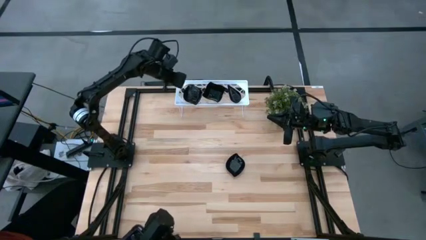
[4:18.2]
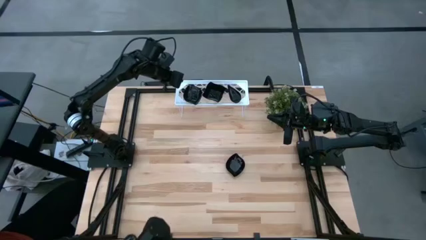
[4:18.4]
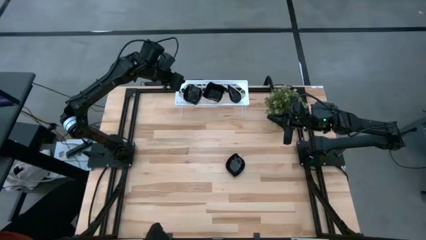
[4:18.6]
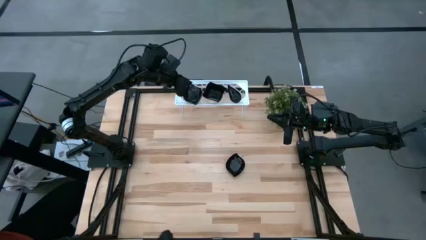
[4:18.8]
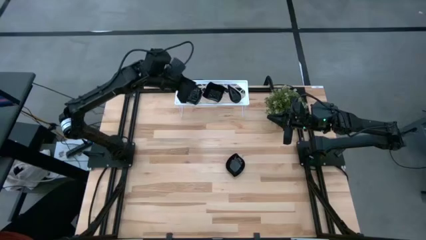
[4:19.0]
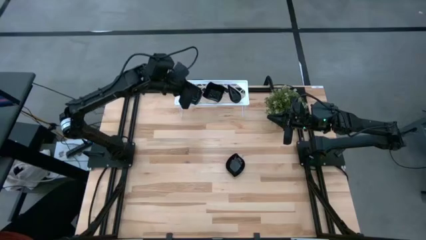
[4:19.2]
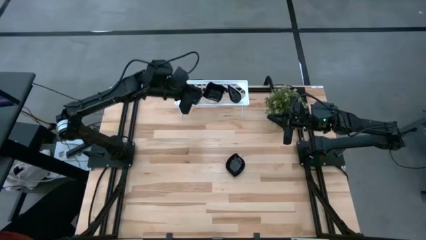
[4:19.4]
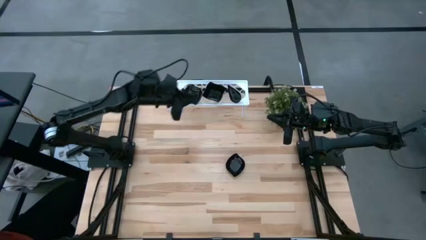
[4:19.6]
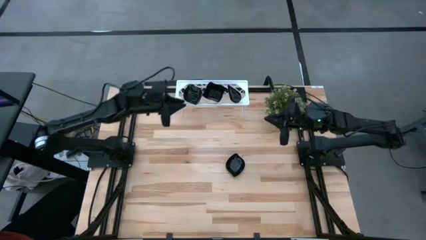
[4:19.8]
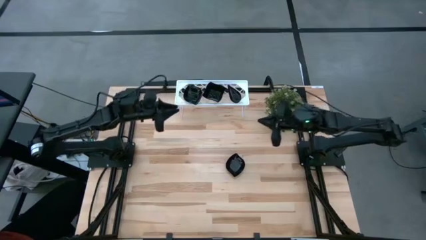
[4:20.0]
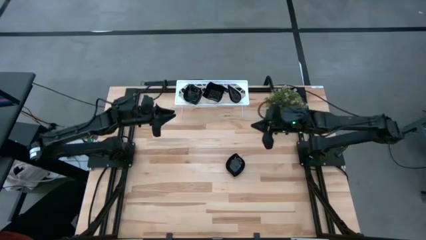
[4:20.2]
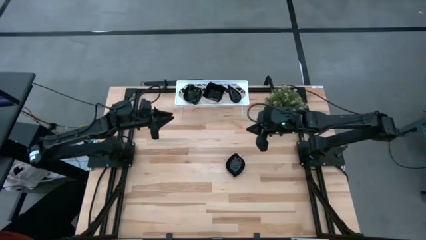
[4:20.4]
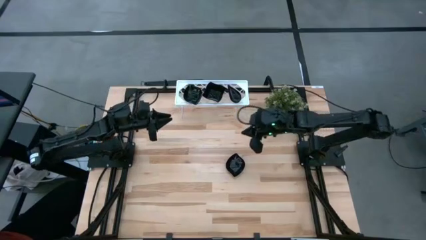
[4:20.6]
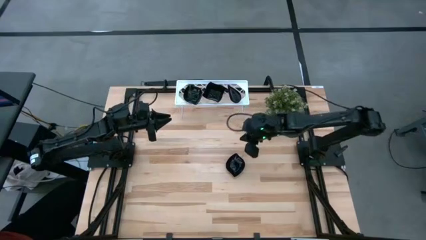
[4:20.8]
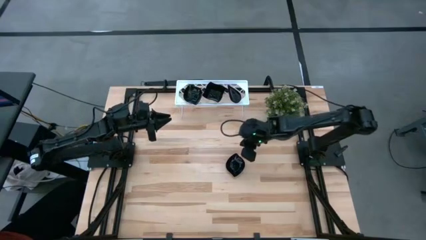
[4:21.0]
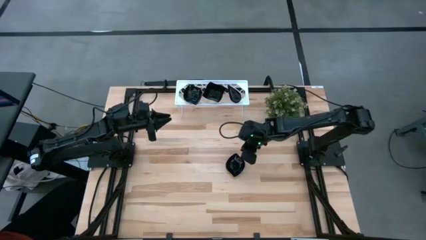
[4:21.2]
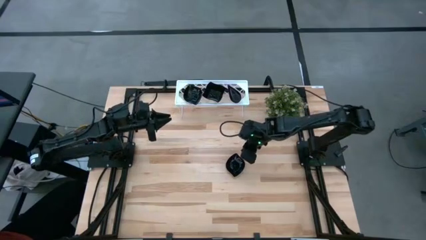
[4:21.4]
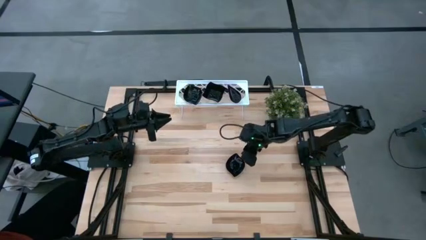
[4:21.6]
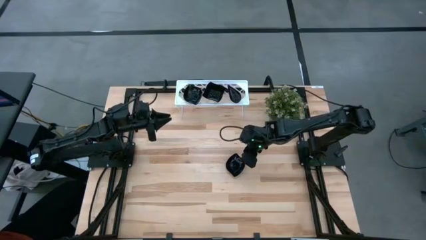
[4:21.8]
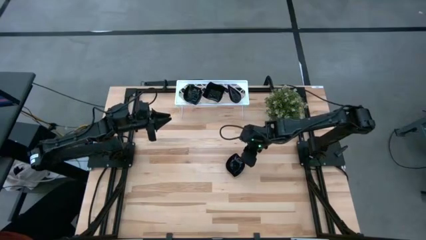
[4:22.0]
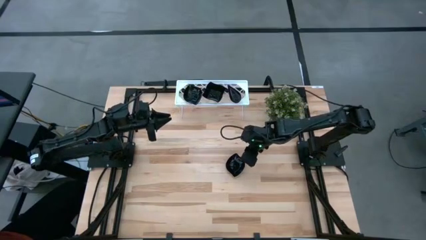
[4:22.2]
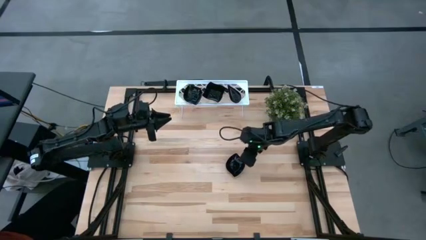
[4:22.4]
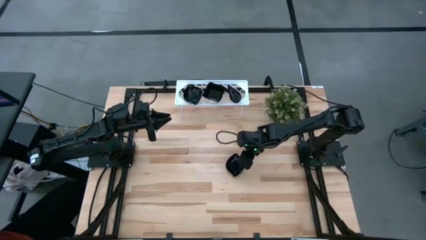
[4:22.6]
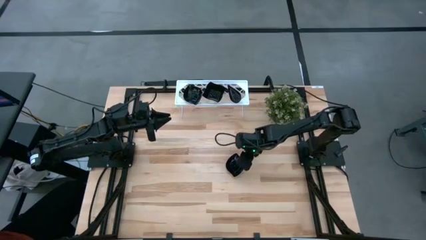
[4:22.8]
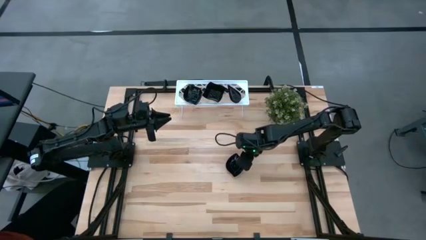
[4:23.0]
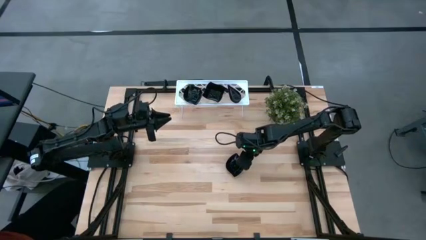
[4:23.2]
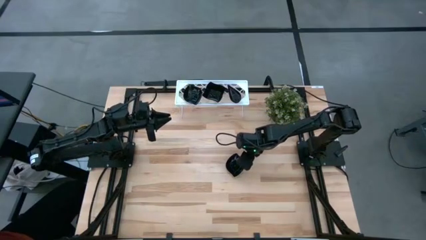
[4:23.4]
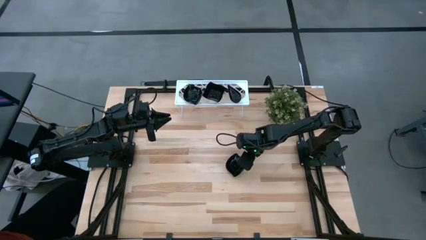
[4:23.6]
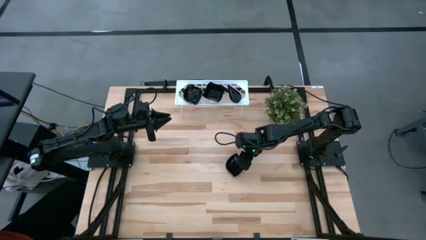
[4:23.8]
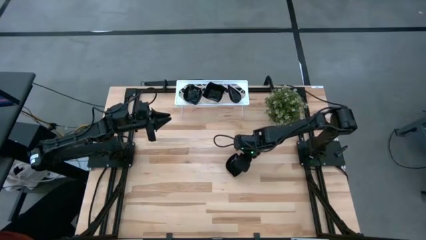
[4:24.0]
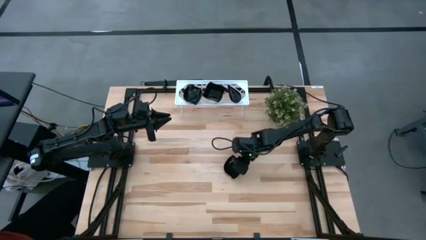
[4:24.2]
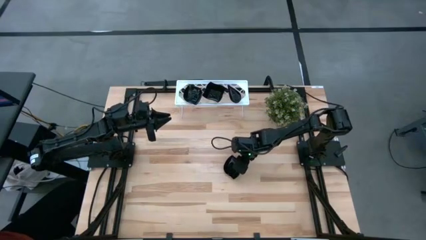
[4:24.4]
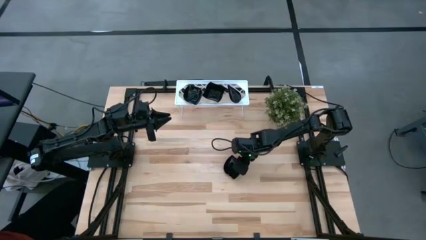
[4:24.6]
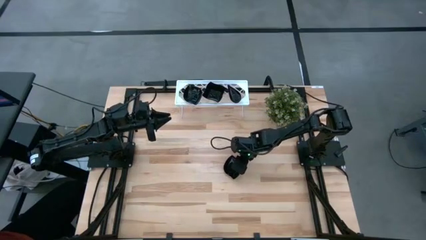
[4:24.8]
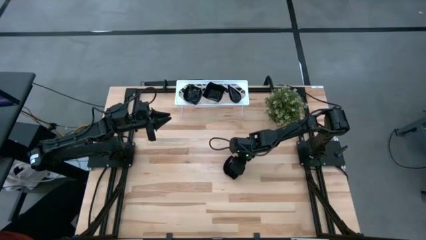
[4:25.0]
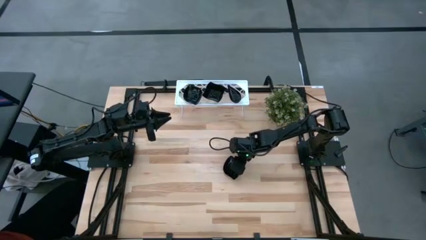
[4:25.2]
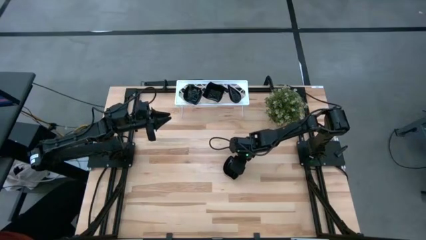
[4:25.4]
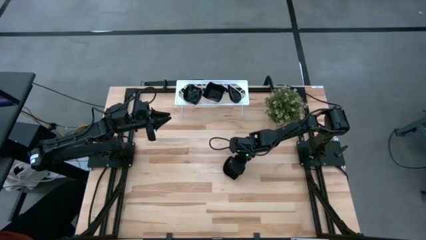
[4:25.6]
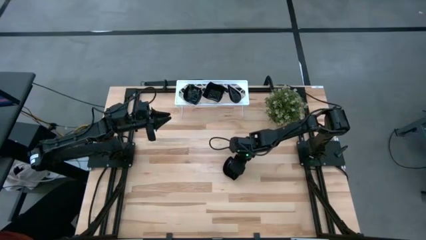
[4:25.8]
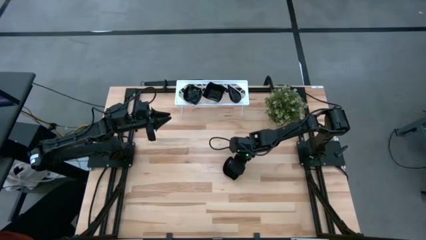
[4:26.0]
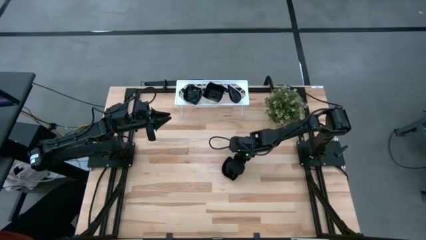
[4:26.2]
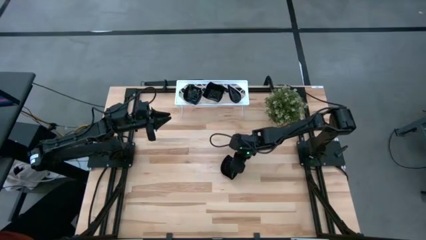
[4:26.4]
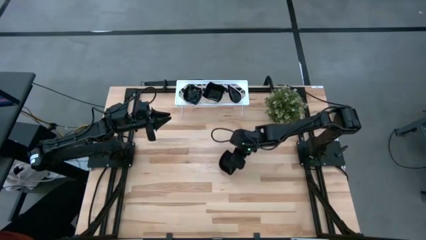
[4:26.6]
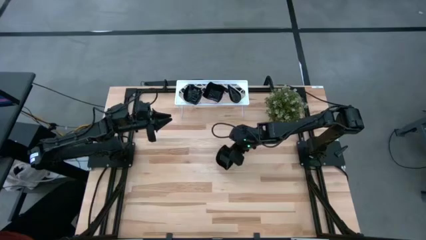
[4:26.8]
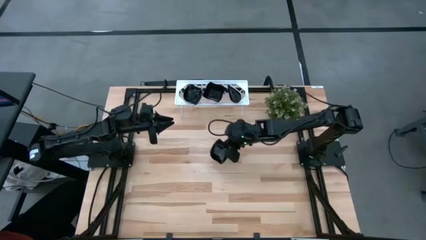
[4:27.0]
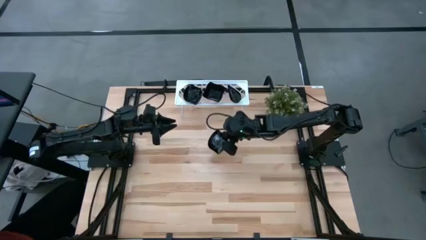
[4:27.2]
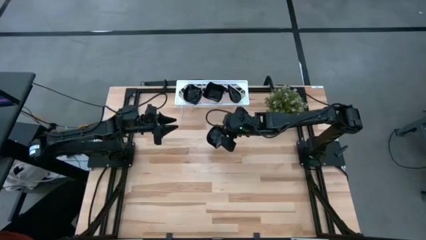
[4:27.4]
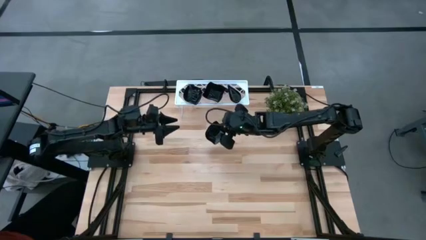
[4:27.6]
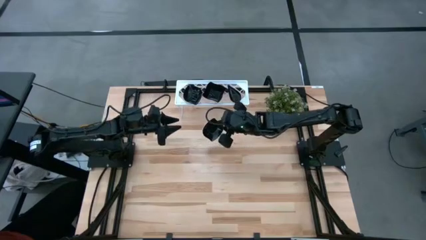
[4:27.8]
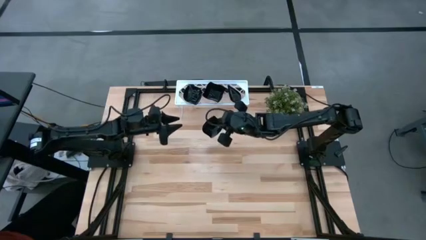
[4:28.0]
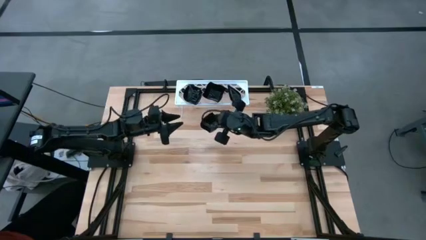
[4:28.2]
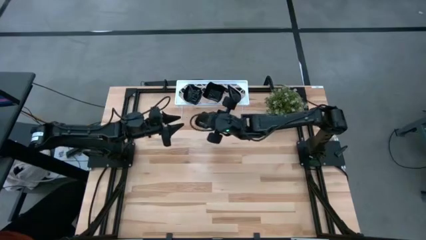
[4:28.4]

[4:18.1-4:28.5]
Task: Pick & Place Mini shaped plates
Stack the leaf-shaped plate on top of the other leaf-shaped plates on the shelf

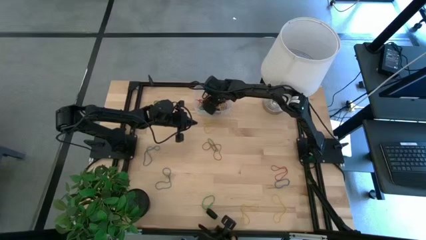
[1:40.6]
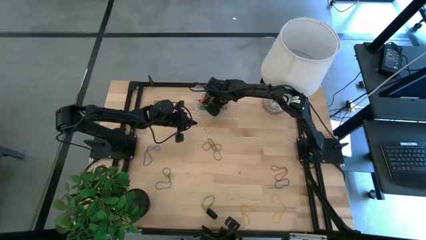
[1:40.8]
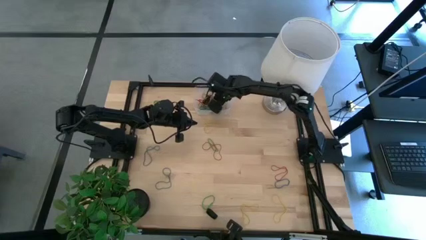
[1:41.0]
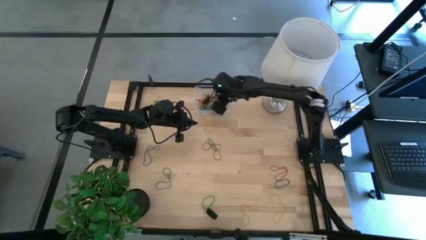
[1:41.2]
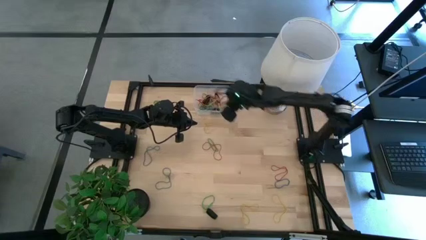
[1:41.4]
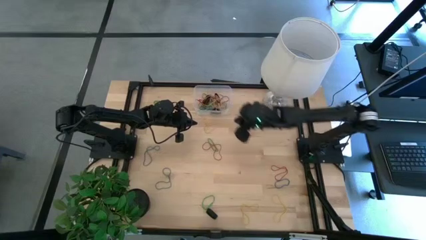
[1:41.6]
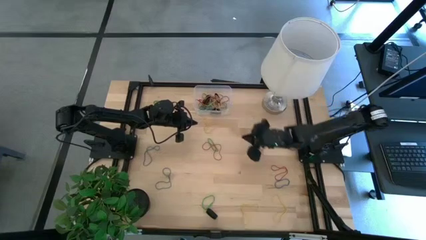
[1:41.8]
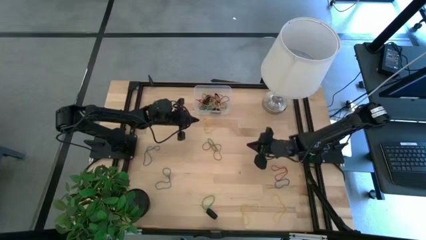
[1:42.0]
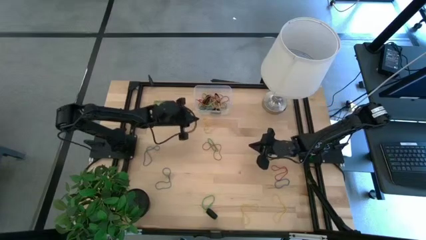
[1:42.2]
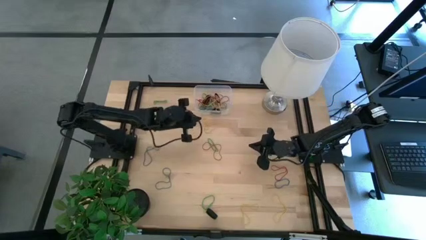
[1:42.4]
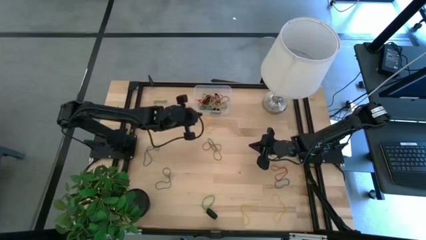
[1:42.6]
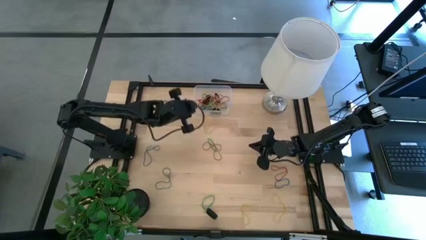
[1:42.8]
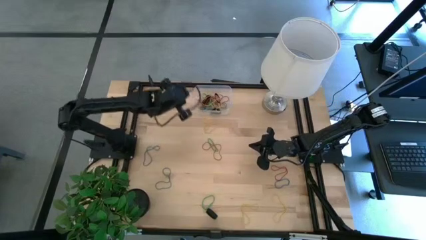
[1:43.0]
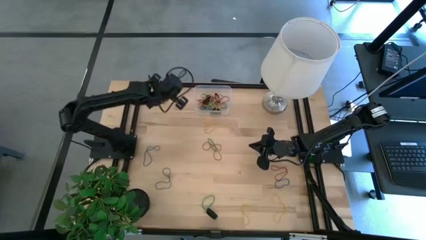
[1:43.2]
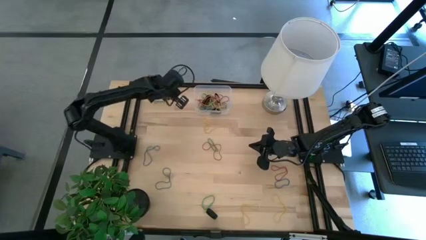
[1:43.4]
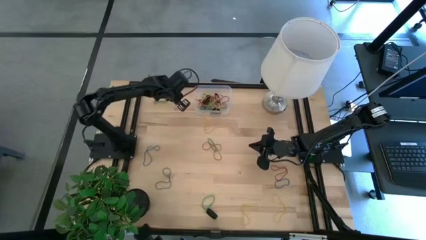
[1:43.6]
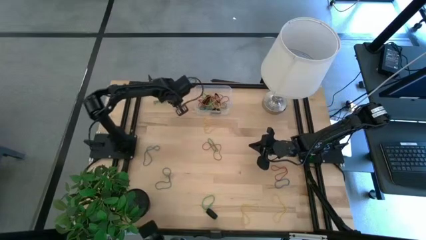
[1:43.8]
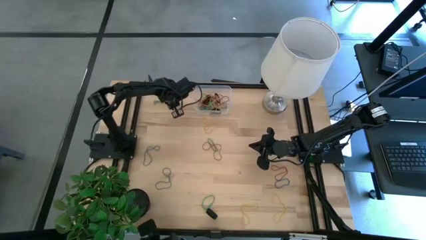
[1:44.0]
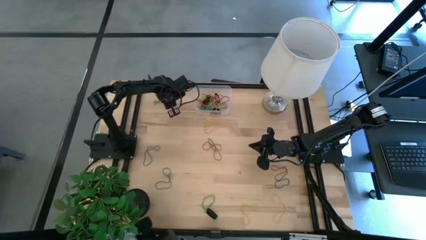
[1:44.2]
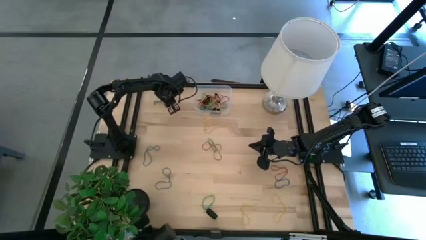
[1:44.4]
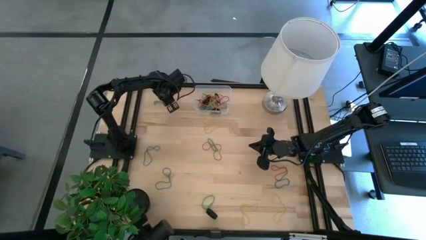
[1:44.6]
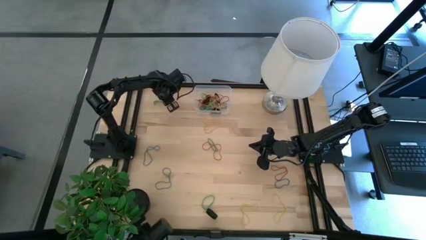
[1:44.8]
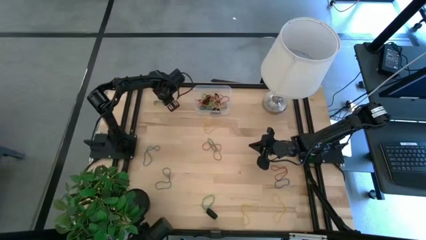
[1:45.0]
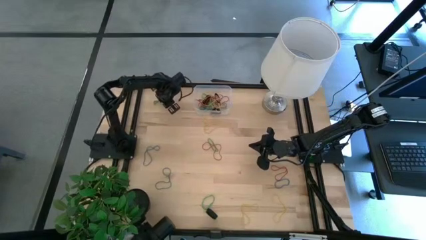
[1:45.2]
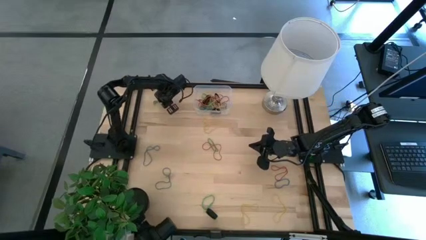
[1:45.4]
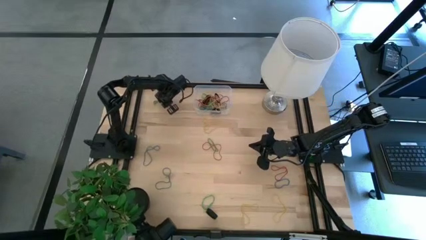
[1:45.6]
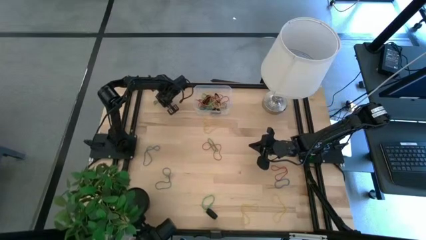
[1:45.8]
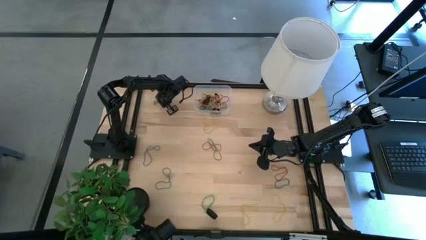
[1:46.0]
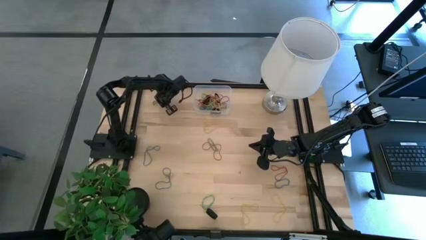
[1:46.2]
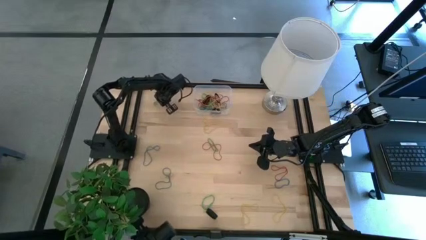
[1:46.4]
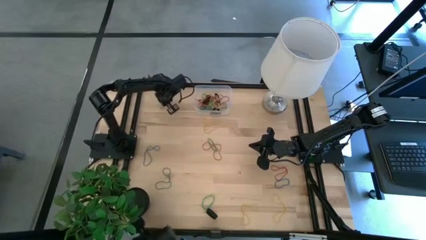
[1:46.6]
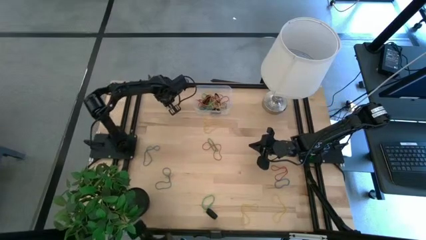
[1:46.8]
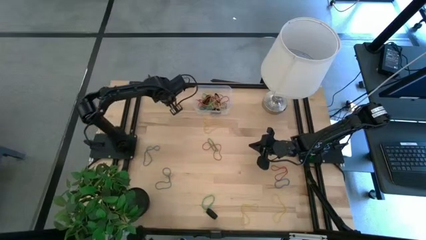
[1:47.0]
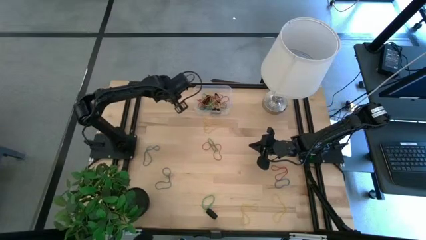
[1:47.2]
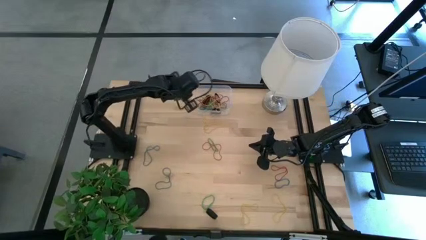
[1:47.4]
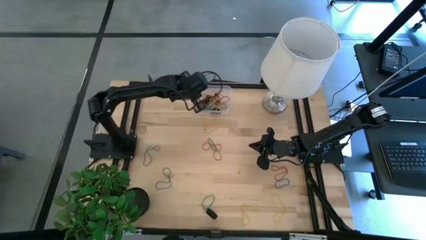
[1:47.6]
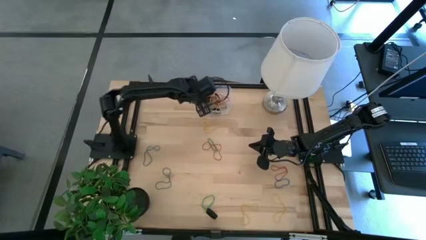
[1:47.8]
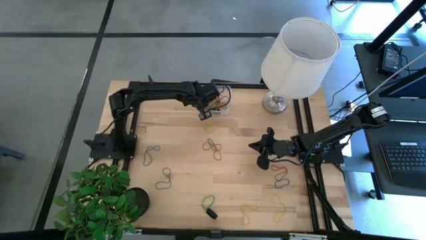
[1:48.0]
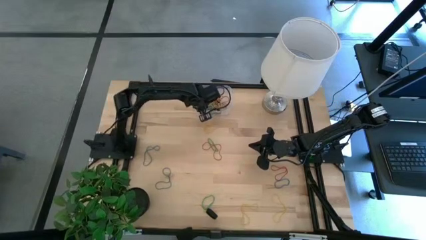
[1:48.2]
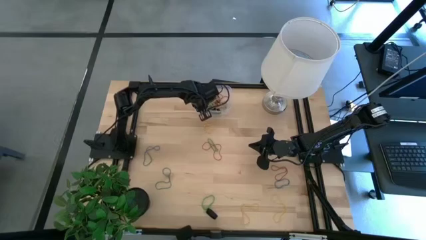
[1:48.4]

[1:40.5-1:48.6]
Task: Pick and place rubber bands into bin
Put the green rubber band into the transparent bin
